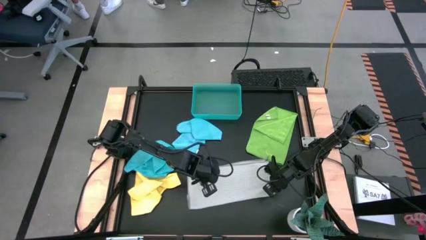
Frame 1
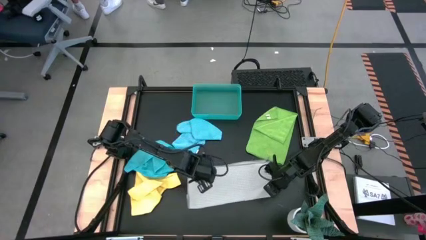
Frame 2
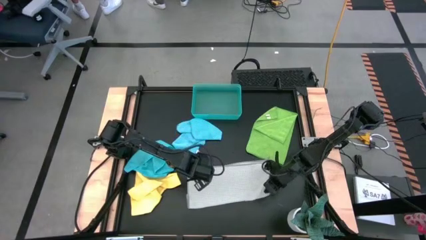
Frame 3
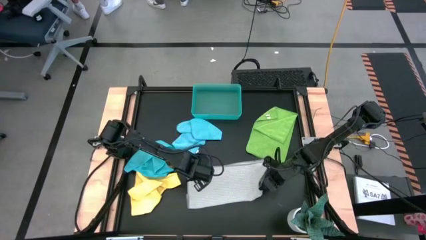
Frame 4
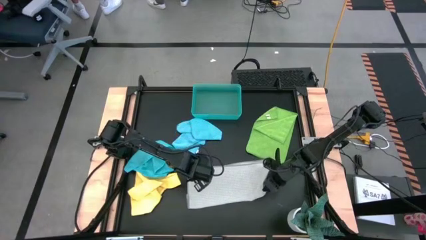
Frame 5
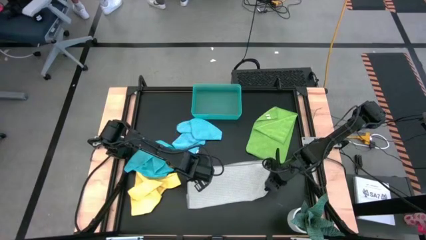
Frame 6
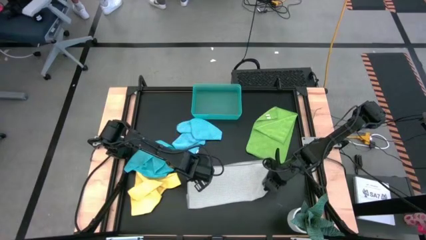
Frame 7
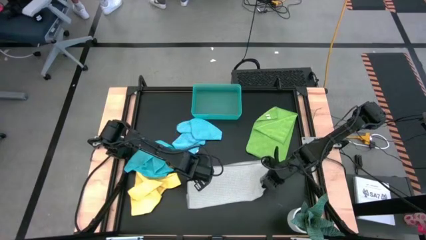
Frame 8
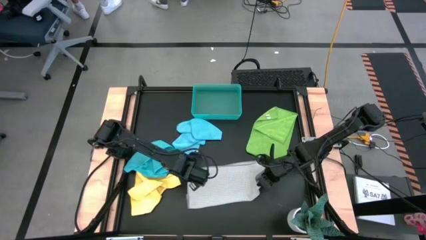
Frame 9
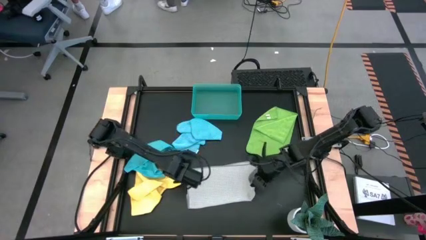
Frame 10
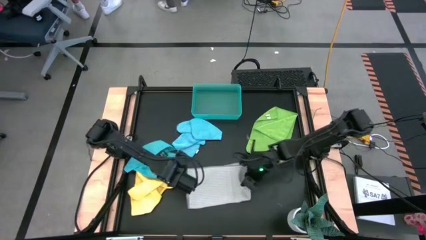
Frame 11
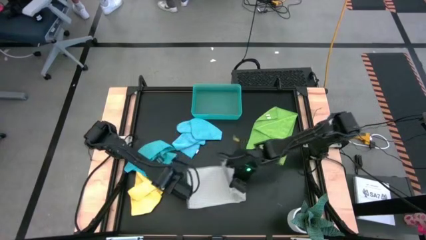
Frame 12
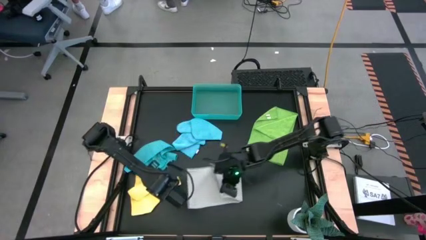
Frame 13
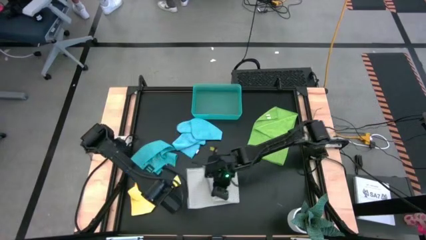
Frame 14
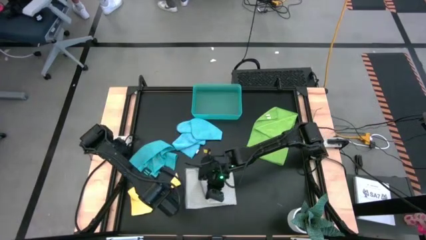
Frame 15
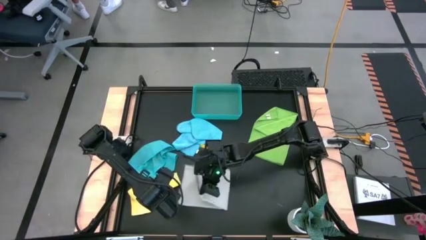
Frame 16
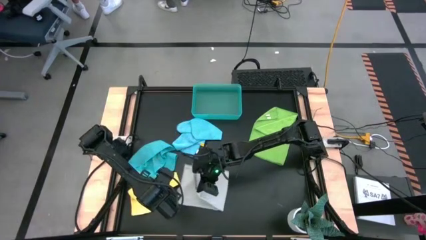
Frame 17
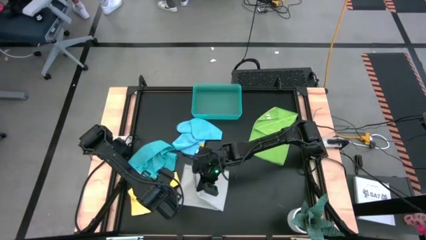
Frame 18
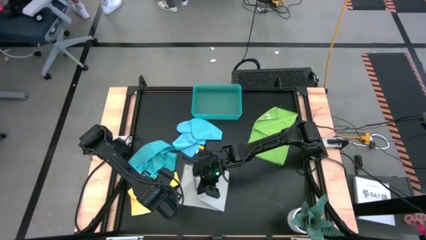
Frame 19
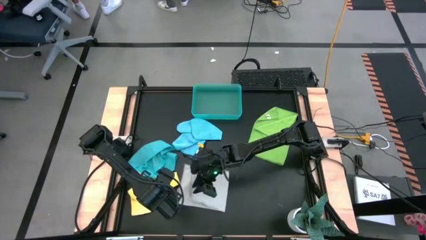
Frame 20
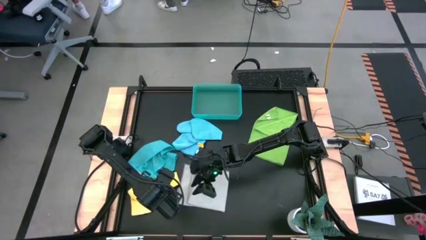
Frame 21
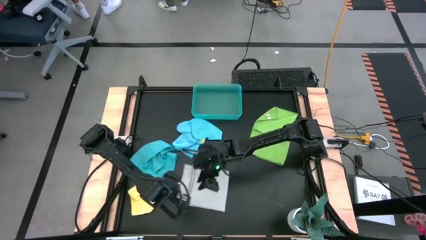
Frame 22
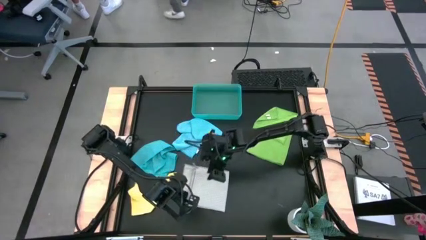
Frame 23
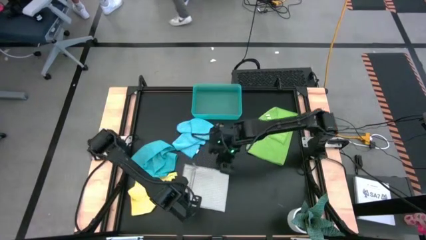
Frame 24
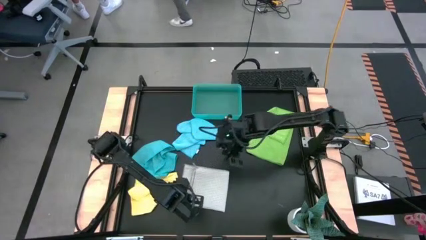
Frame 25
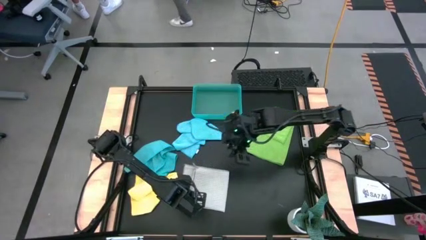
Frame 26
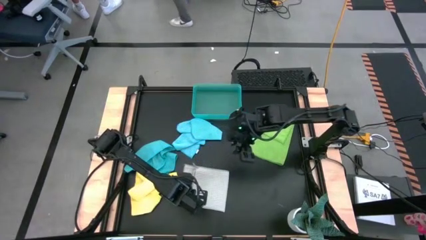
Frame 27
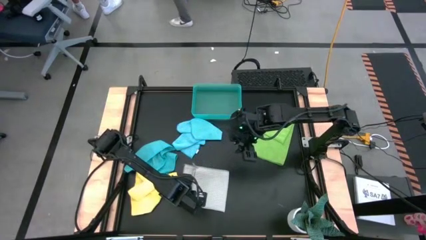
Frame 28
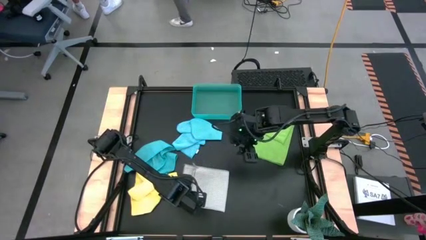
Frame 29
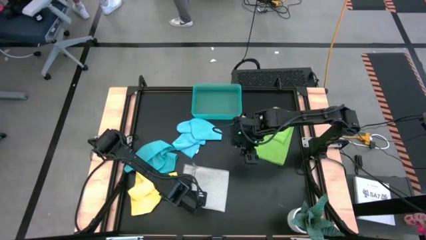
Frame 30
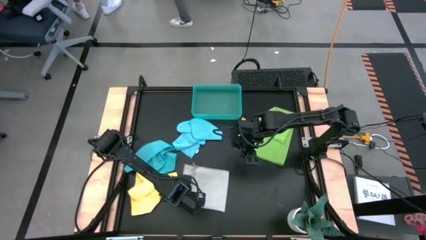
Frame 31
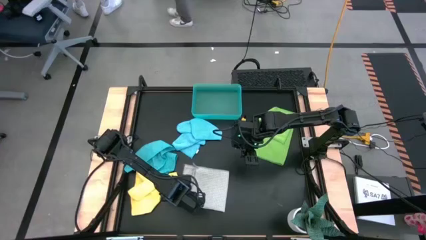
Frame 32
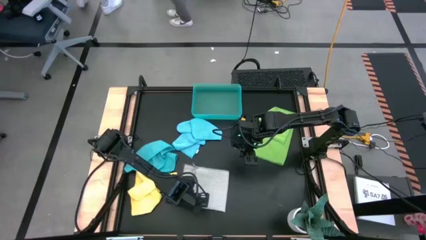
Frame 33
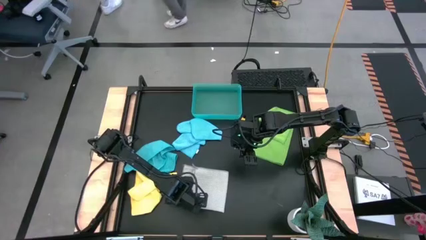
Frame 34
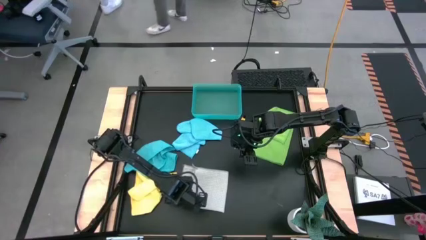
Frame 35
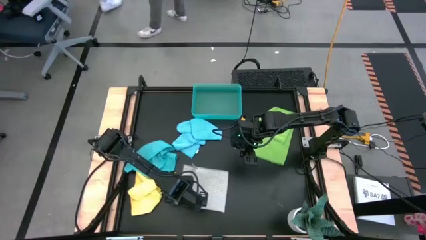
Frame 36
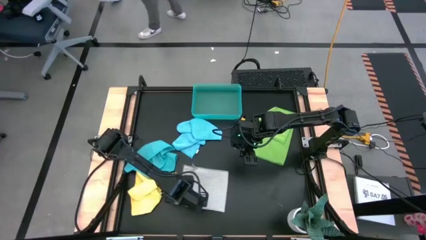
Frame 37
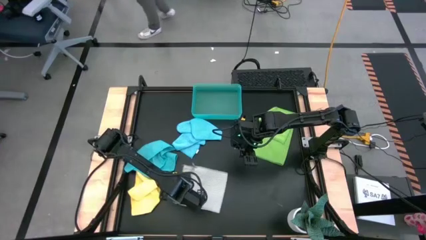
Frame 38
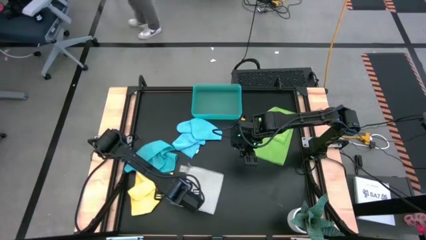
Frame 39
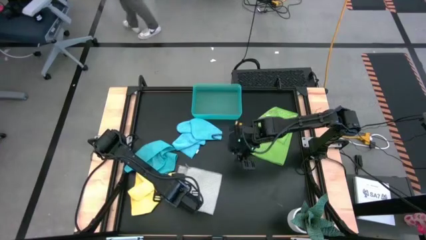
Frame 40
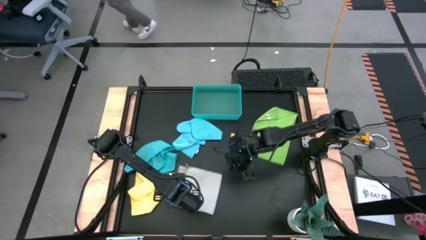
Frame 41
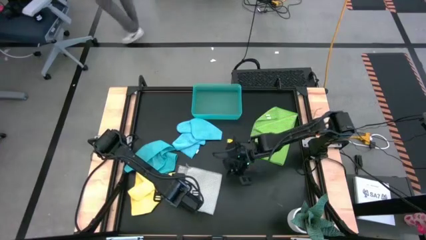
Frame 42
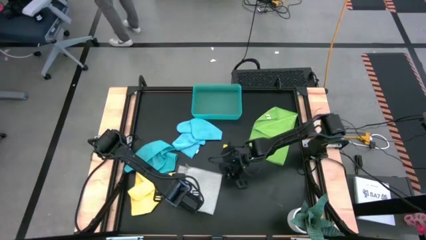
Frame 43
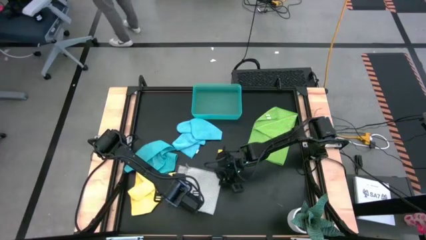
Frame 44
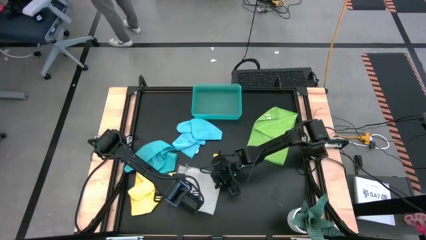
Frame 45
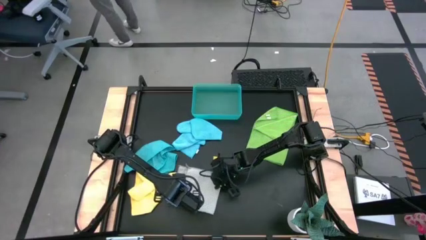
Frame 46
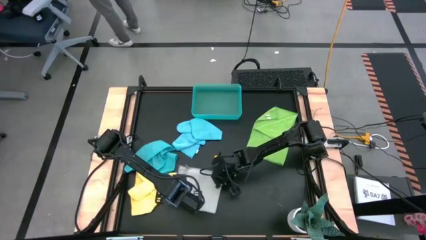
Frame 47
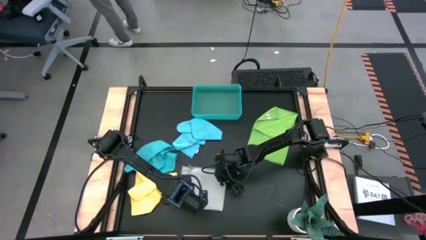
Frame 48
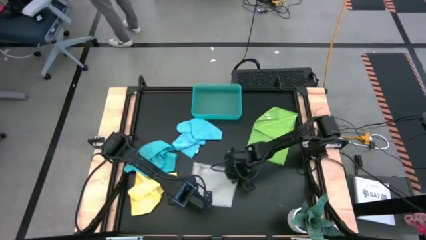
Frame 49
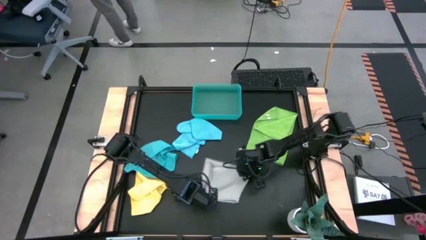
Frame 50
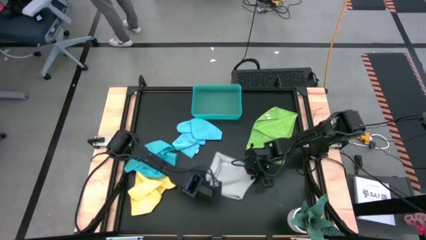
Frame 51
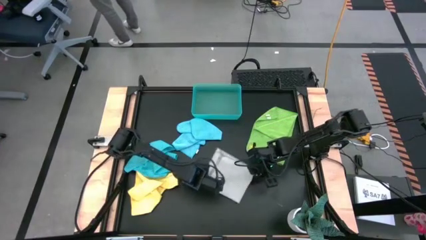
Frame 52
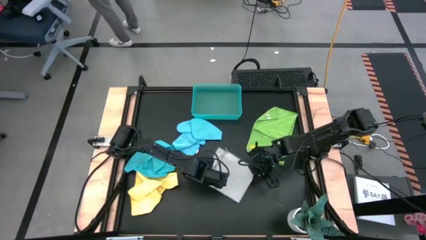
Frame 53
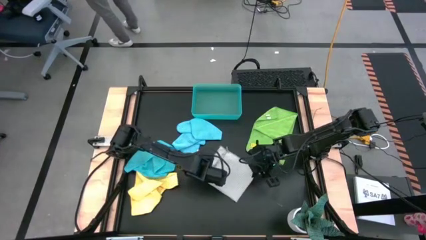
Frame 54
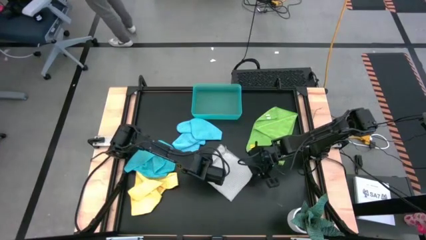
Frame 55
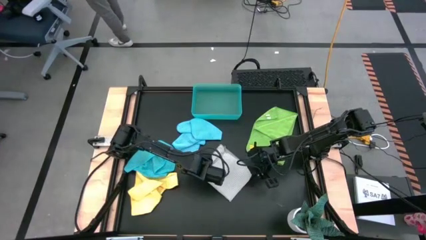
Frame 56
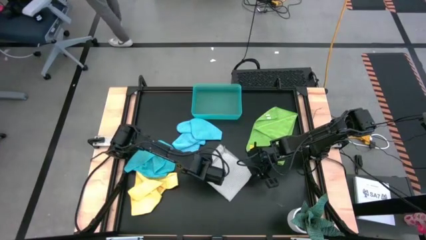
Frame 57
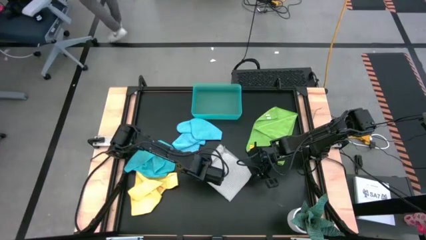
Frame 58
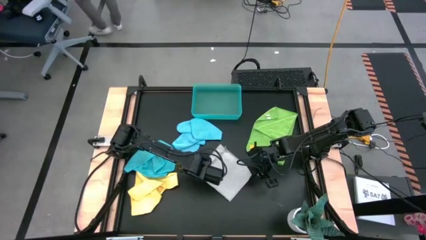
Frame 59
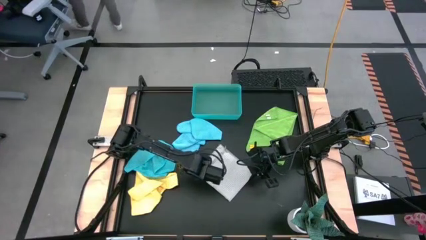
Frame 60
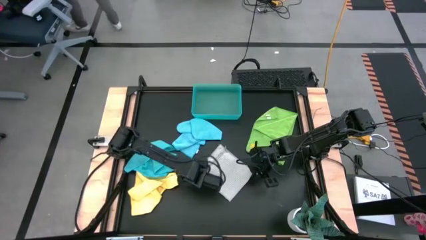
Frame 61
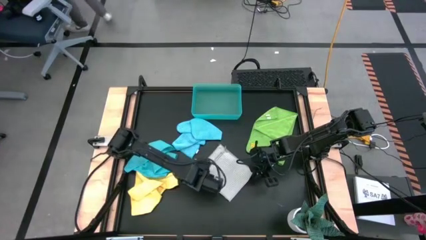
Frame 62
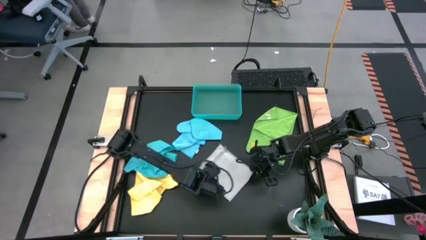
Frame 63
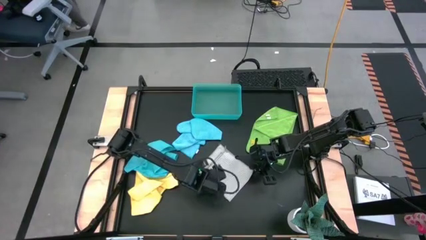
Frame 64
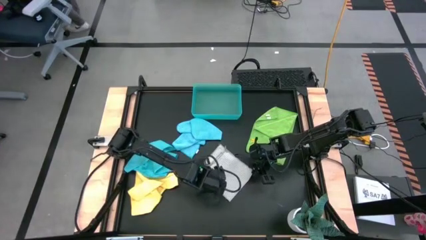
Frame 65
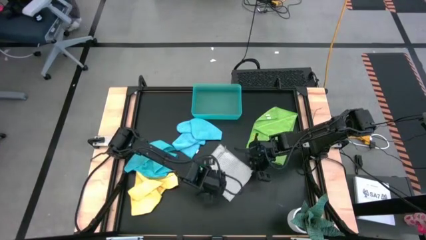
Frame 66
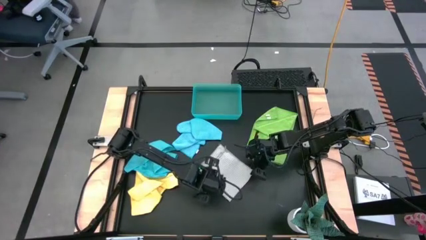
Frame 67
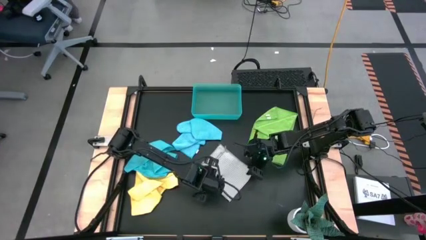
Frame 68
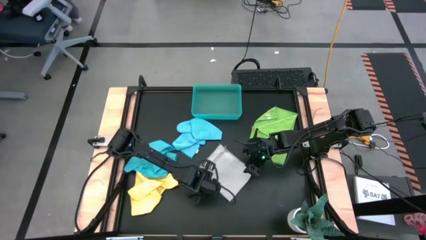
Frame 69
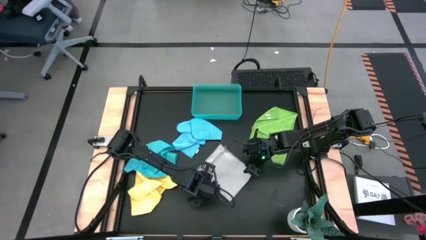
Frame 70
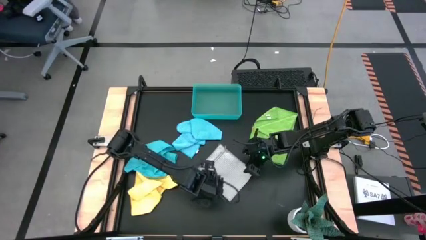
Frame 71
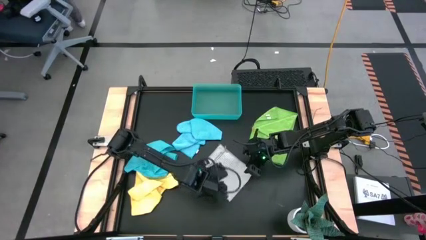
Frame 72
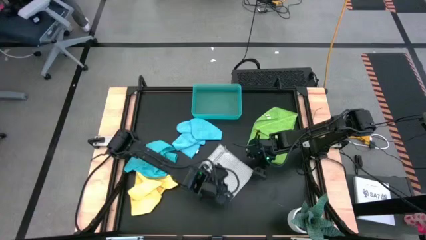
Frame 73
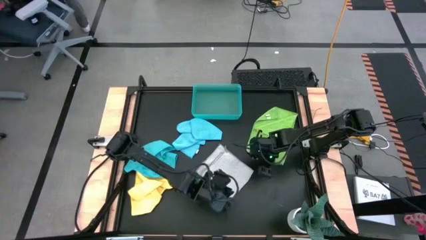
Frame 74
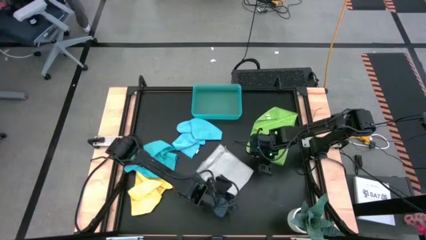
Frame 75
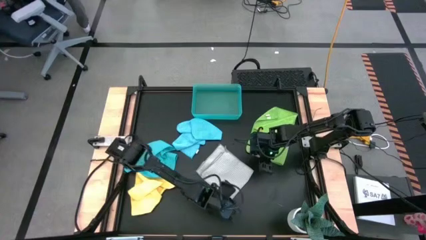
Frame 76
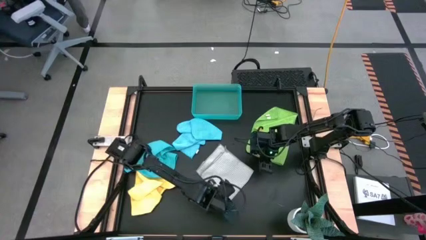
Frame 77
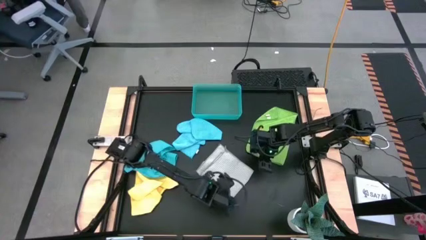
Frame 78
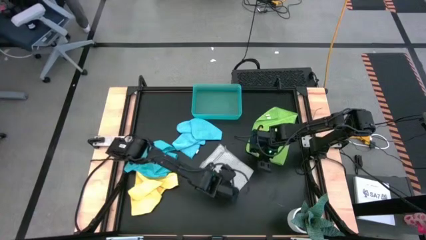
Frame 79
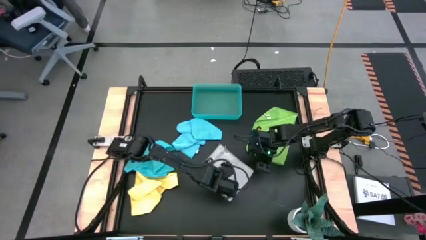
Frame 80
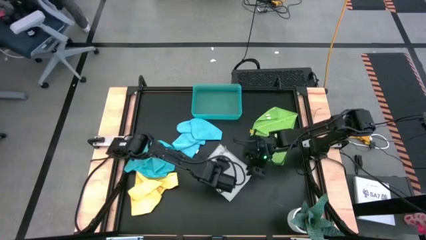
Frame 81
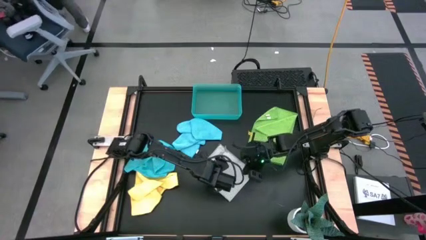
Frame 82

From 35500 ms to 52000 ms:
Task: Fold microfiber towels
Fold the gray microfiber towel
